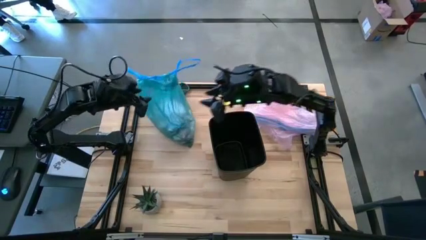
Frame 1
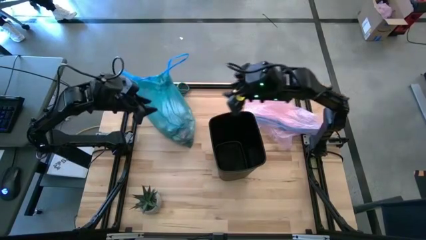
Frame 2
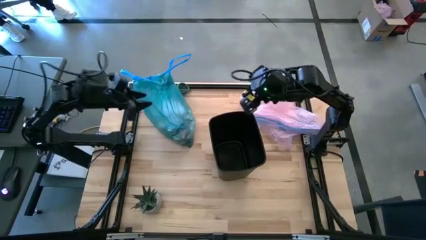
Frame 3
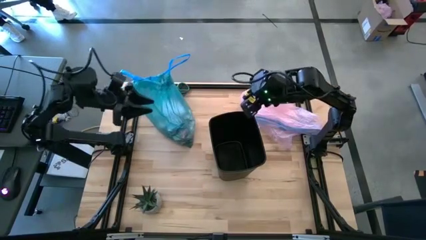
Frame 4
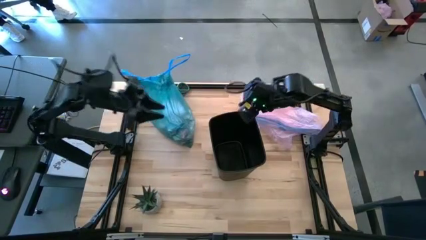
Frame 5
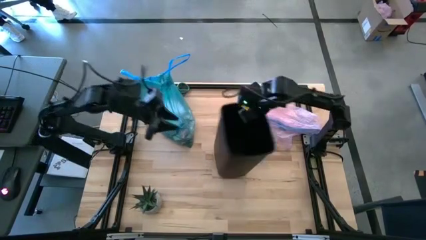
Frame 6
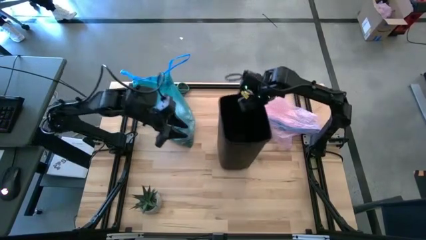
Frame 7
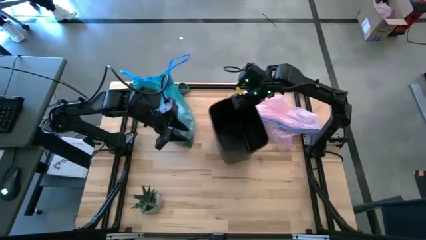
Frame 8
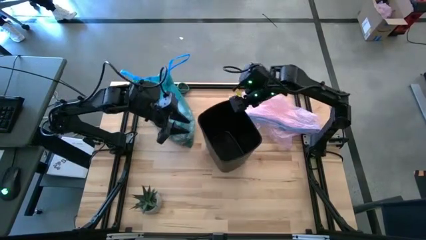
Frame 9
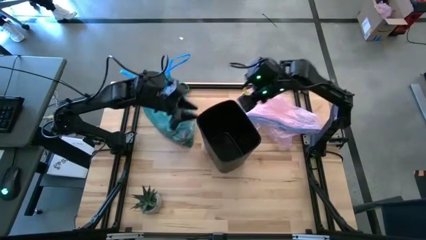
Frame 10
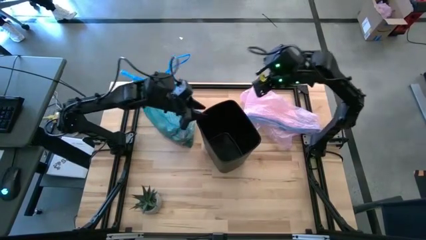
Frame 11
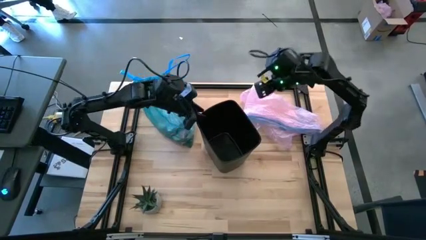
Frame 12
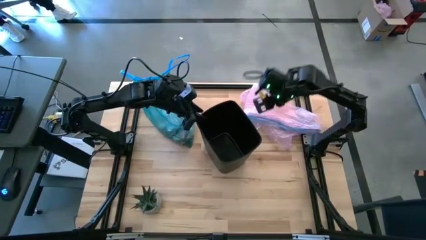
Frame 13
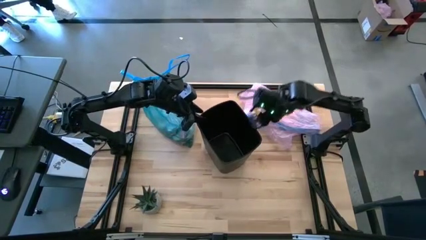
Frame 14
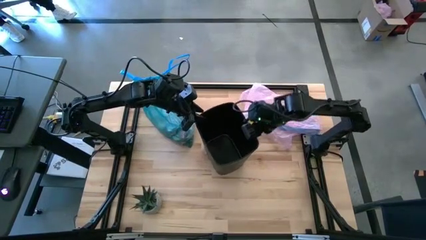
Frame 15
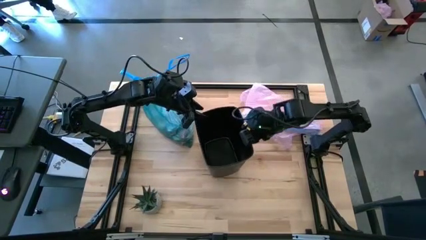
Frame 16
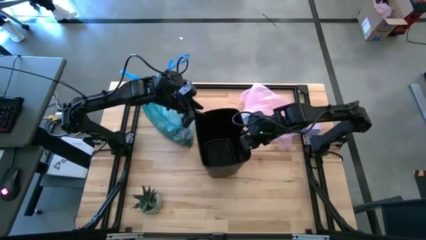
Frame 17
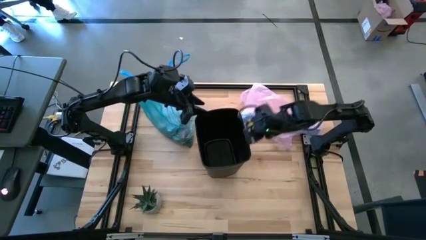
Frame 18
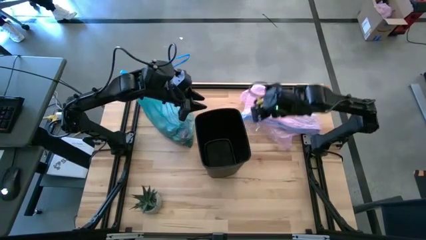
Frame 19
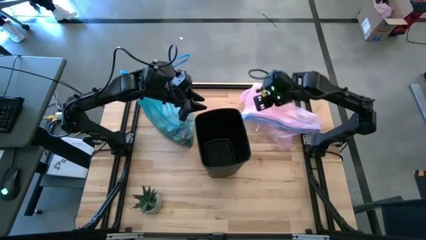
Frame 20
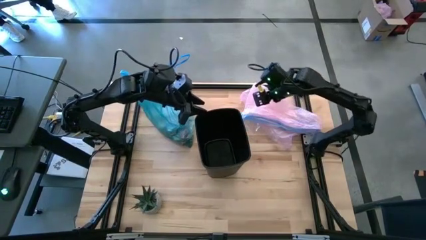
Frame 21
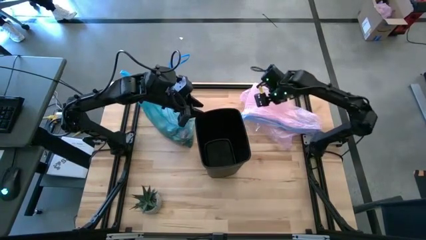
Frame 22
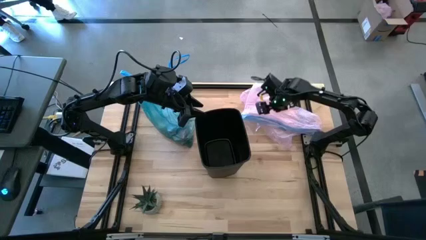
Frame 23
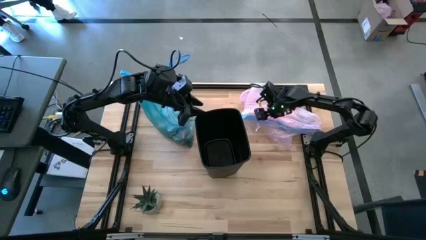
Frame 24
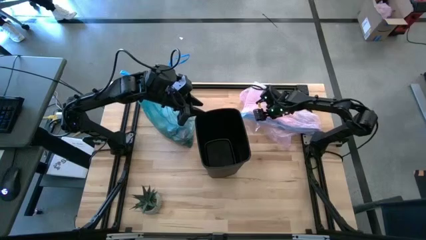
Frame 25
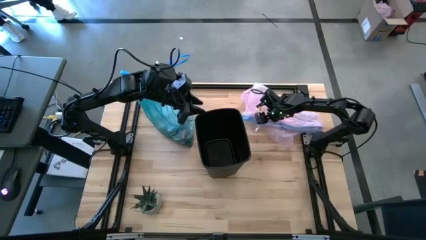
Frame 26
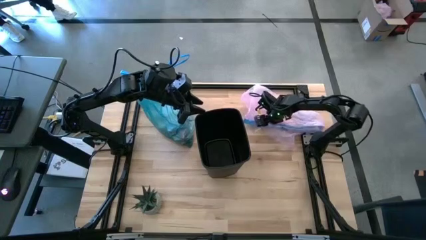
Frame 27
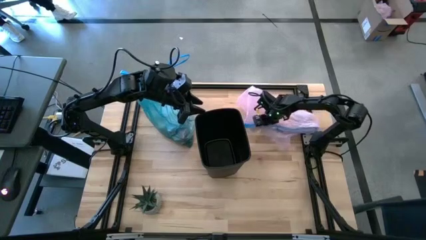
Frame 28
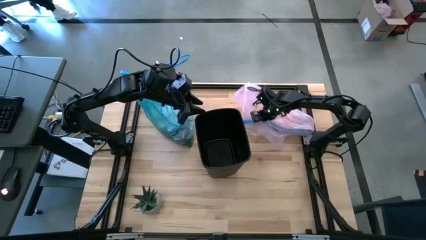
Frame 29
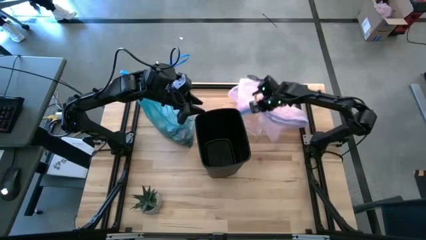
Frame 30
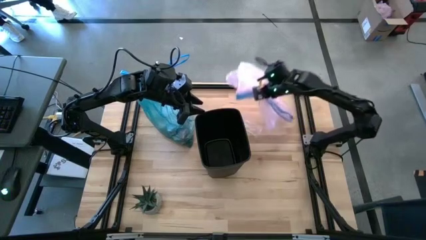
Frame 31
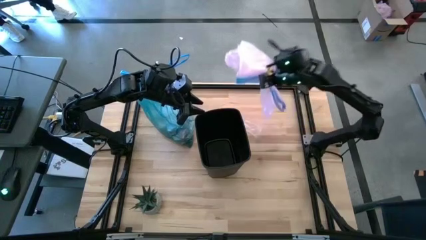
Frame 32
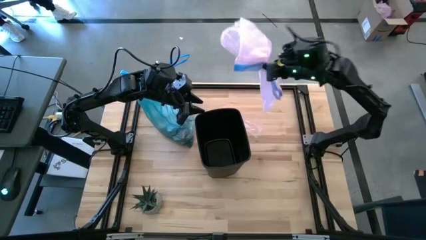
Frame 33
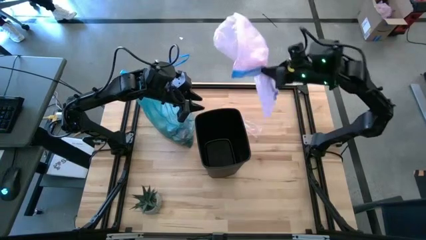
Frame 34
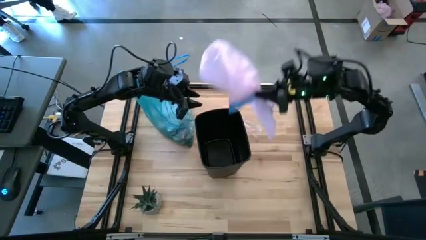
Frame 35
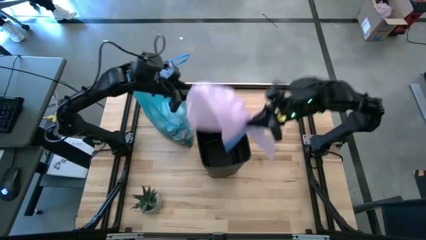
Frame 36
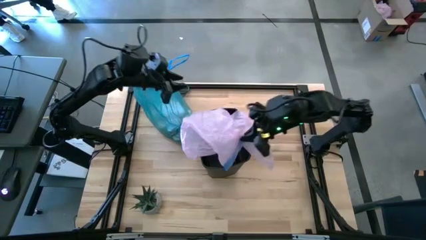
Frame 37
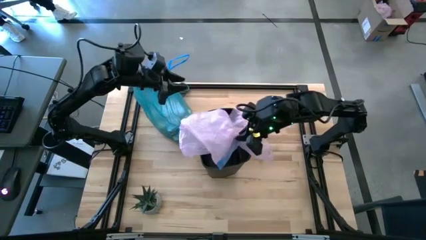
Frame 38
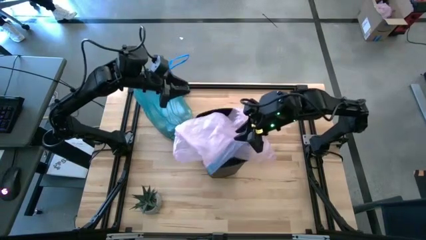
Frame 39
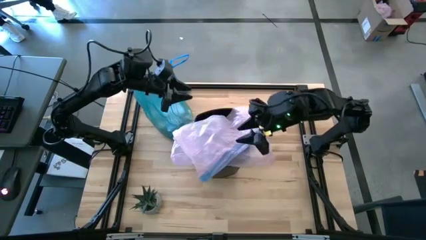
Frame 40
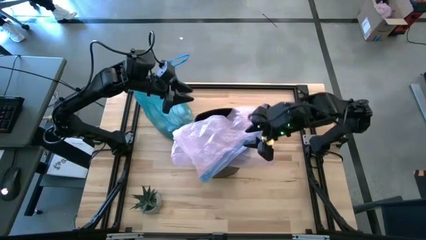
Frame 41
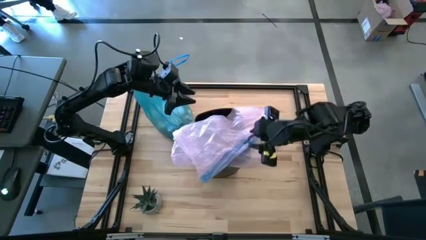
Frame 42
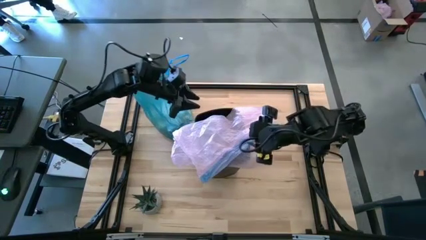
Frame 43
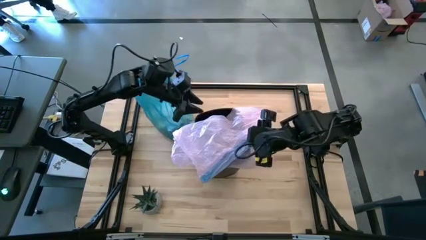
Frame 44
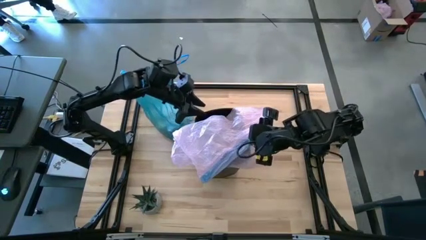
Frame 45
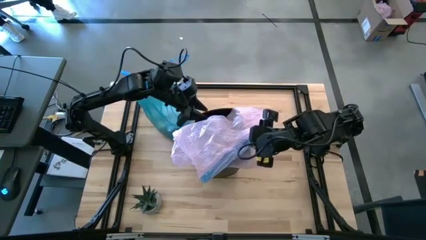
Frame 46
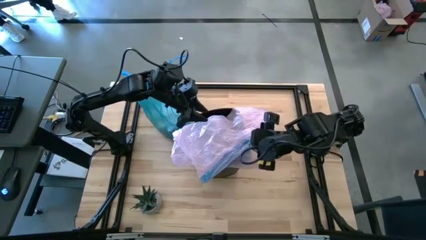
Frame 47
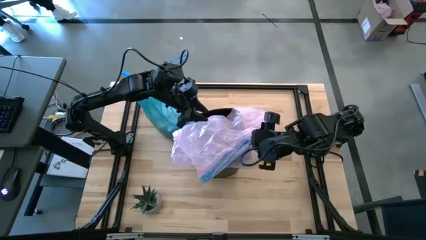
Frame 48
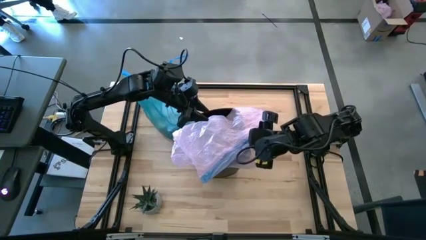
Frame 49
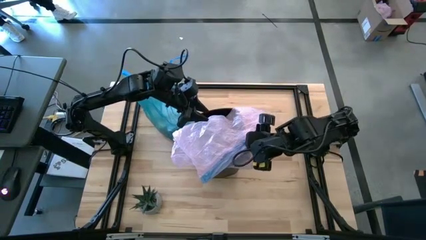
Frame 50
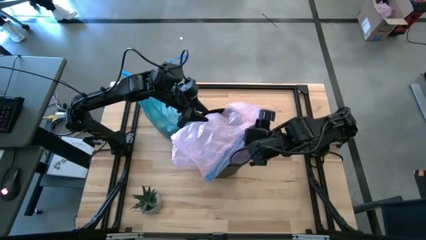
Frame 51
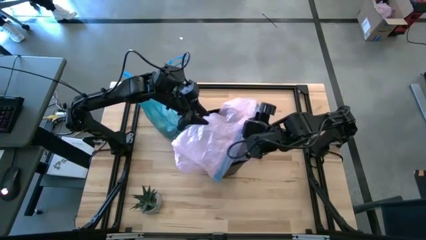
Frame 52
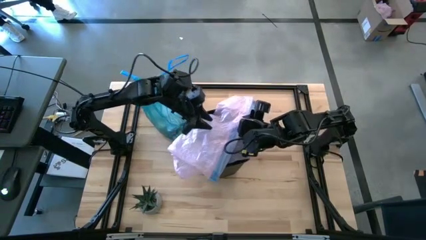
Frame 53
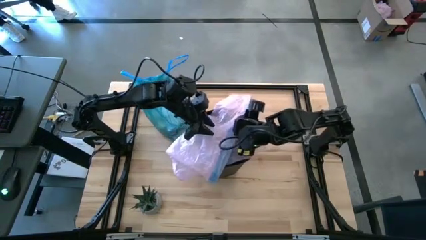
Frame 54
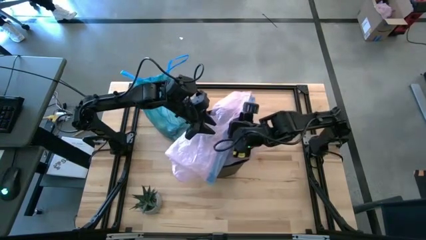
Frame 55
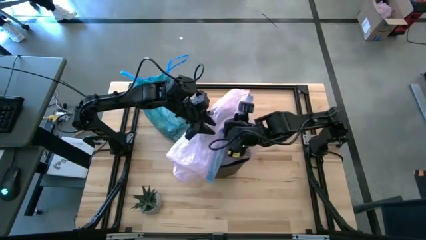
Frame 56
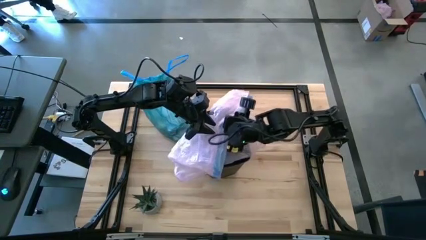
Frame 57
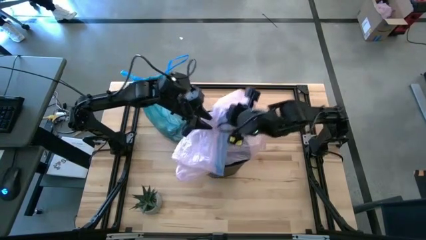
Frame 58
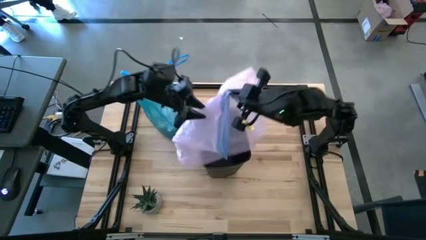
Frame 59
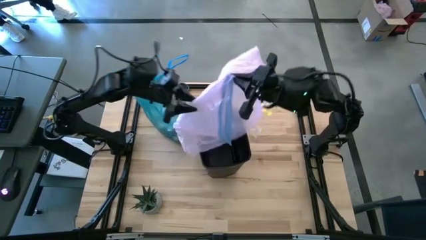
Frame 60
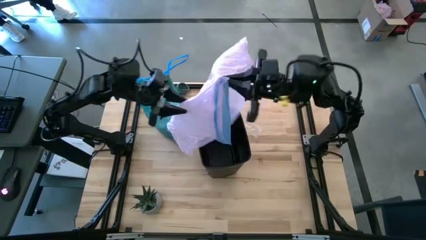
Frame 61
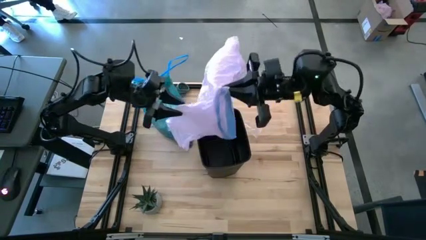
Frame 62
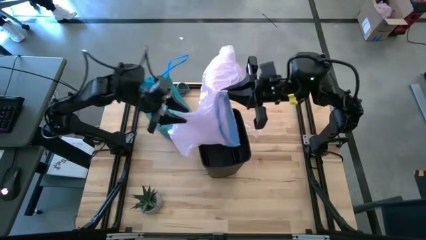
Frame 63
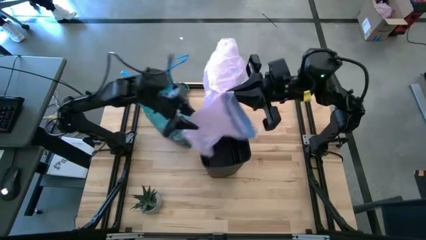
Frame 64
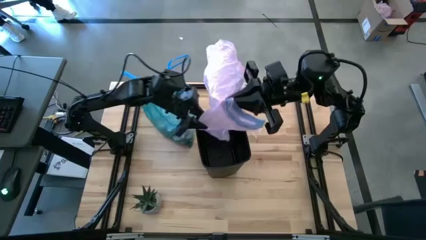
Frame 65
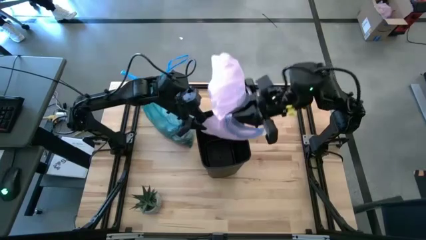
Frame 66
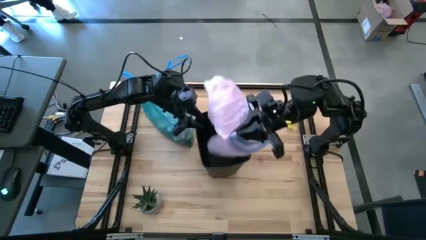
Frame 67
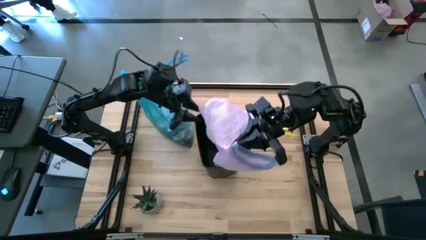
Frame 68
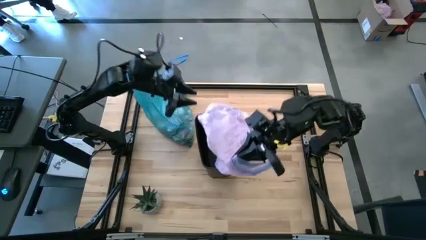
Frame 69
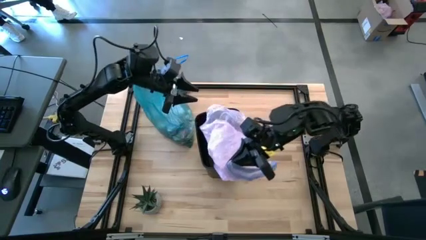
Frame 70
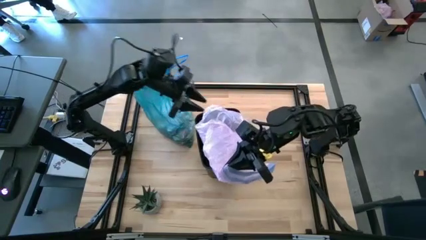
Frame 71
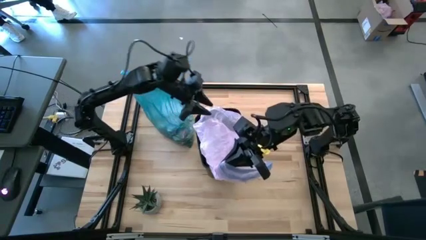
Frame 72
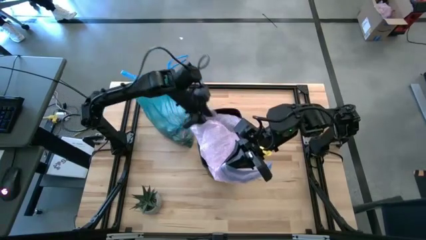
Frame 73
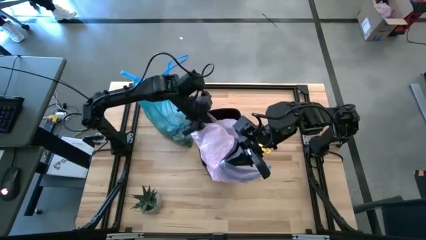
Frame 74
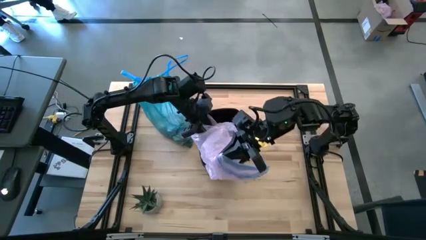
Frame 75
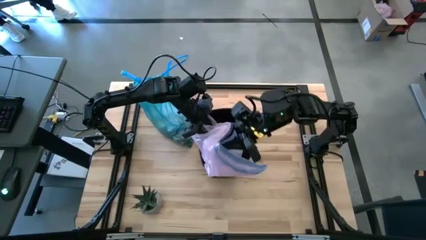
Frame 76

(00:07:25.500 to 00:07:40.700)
Task: place trash/remove bag and relplace
Insert the pink trash bag into the trash bin
